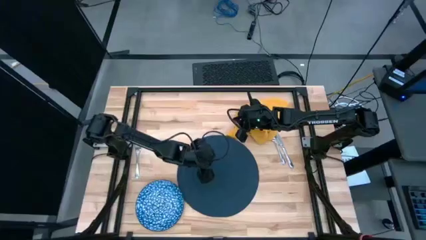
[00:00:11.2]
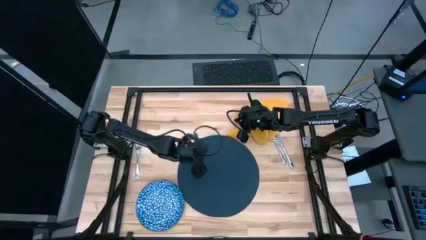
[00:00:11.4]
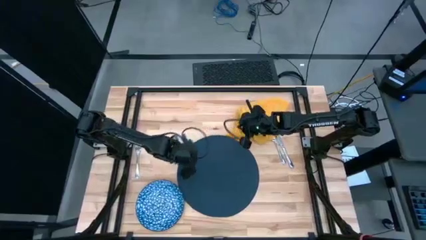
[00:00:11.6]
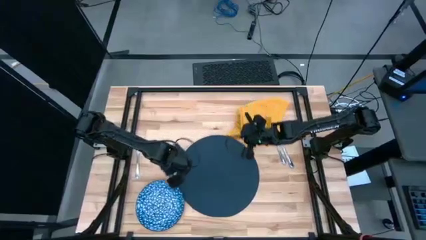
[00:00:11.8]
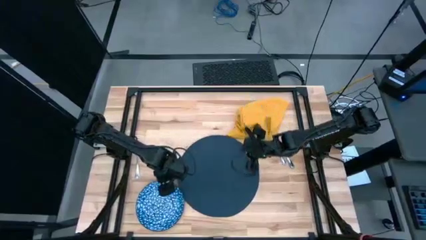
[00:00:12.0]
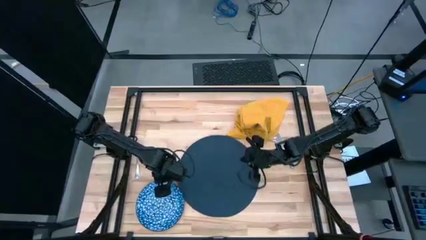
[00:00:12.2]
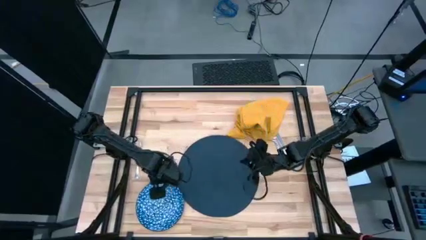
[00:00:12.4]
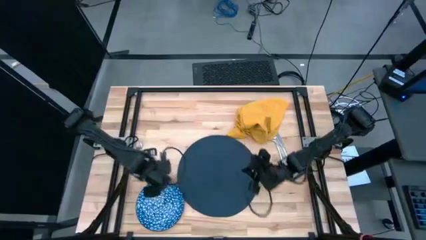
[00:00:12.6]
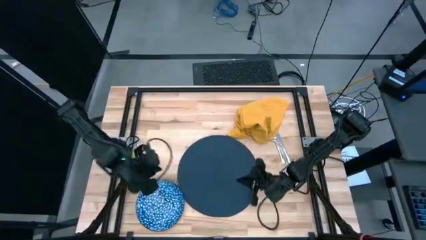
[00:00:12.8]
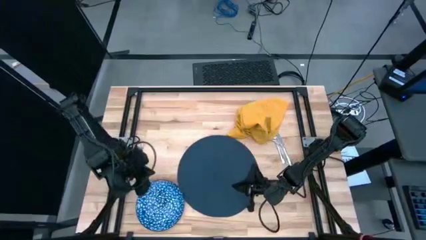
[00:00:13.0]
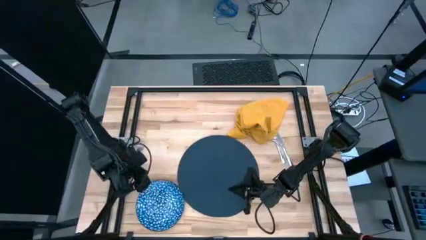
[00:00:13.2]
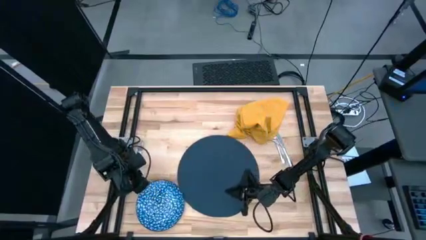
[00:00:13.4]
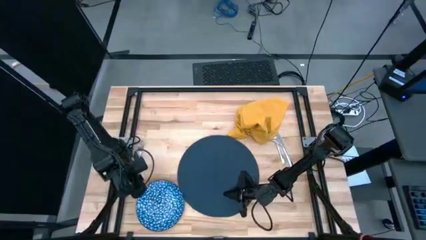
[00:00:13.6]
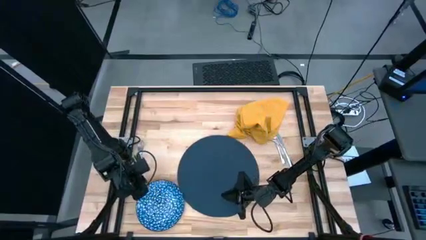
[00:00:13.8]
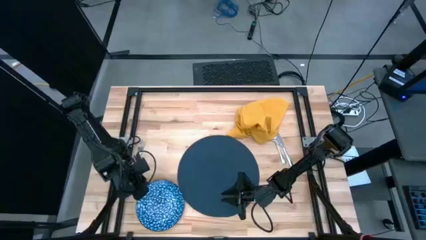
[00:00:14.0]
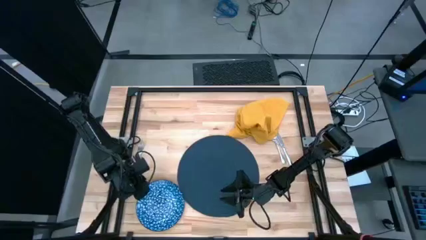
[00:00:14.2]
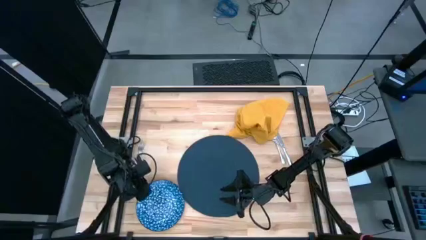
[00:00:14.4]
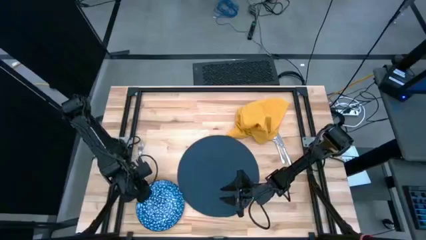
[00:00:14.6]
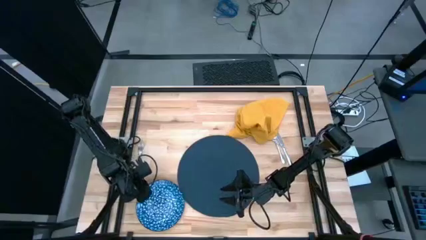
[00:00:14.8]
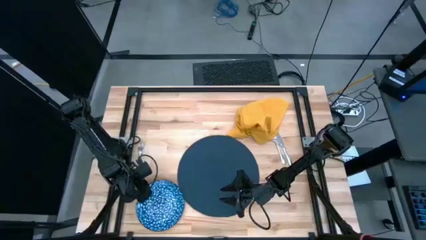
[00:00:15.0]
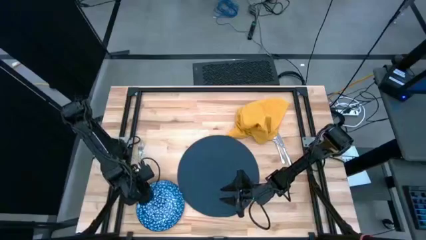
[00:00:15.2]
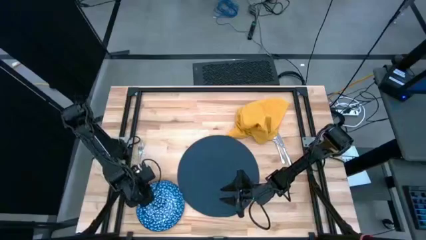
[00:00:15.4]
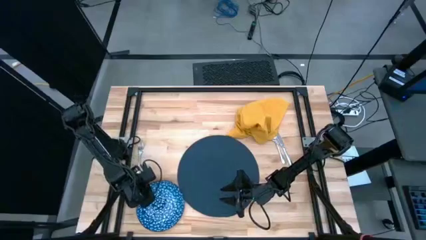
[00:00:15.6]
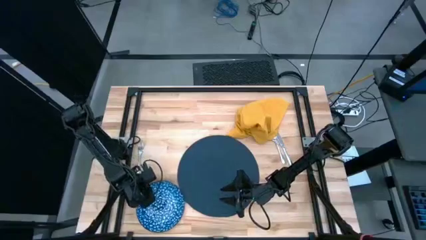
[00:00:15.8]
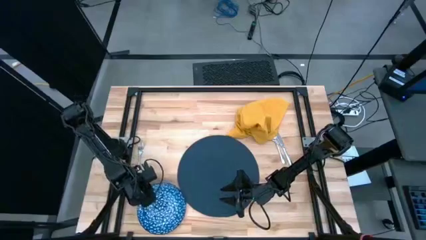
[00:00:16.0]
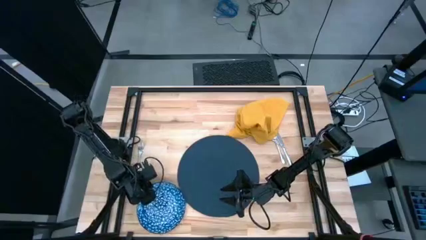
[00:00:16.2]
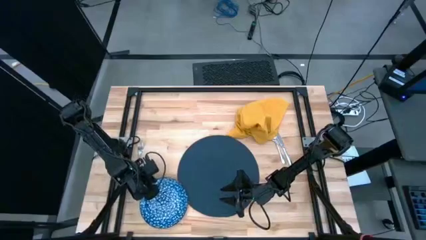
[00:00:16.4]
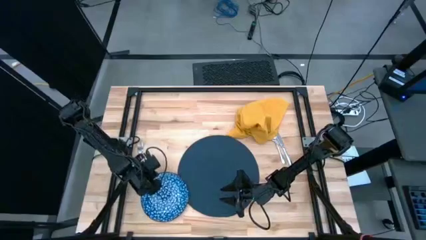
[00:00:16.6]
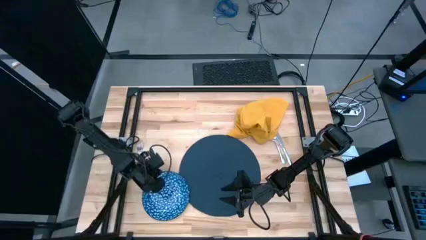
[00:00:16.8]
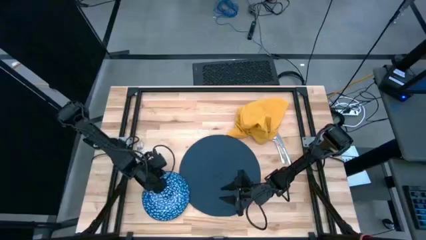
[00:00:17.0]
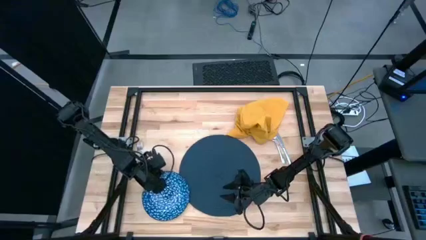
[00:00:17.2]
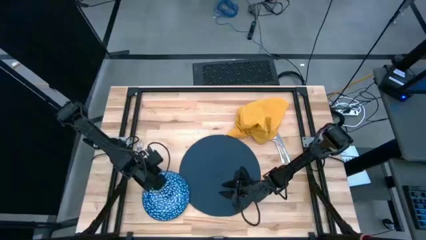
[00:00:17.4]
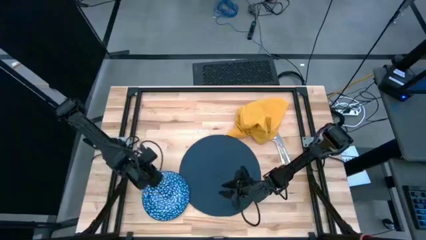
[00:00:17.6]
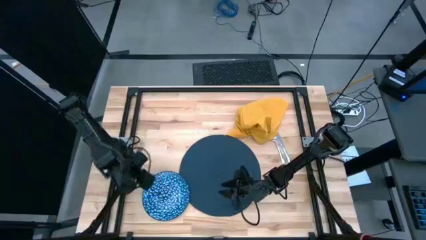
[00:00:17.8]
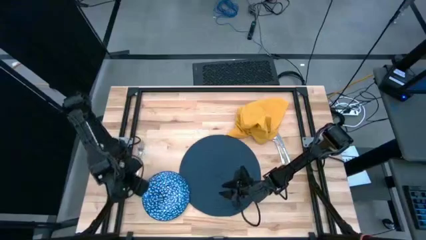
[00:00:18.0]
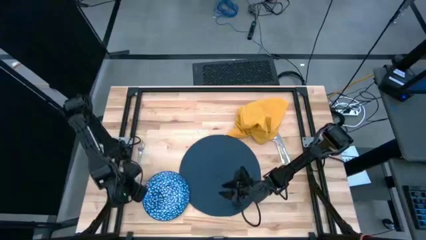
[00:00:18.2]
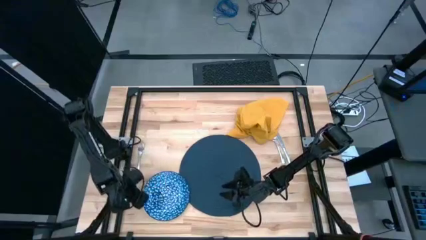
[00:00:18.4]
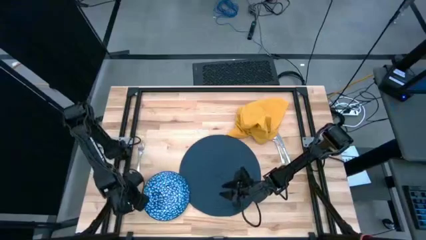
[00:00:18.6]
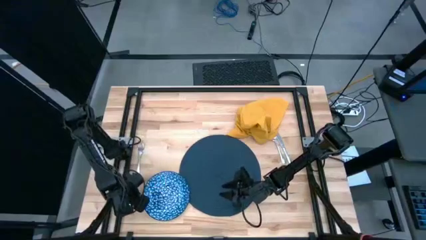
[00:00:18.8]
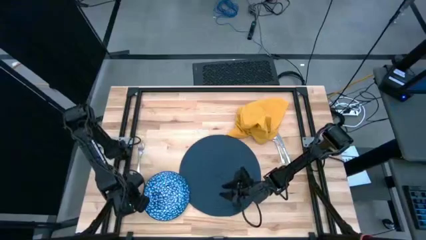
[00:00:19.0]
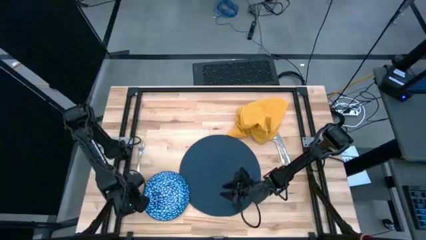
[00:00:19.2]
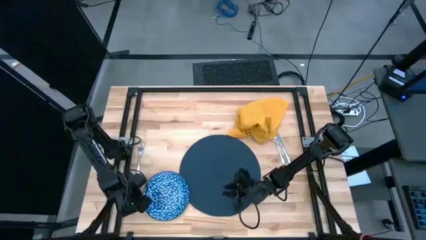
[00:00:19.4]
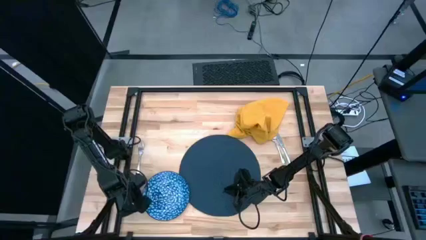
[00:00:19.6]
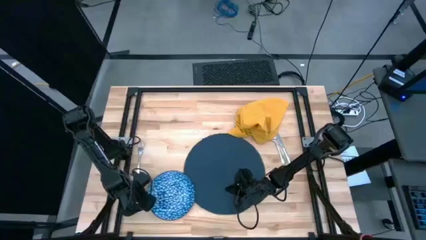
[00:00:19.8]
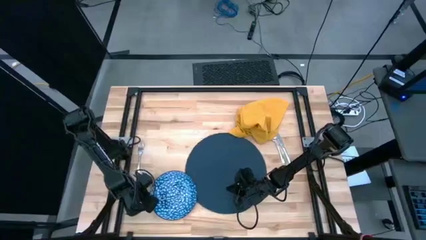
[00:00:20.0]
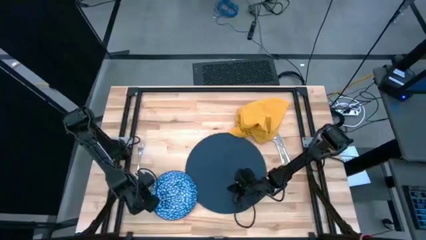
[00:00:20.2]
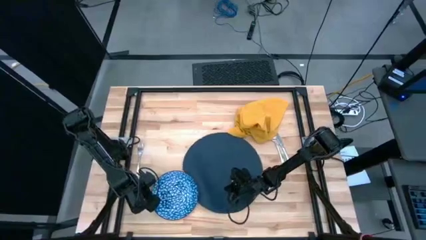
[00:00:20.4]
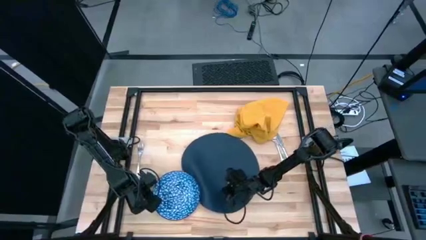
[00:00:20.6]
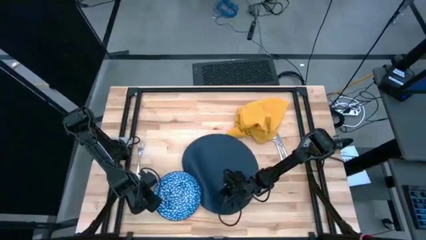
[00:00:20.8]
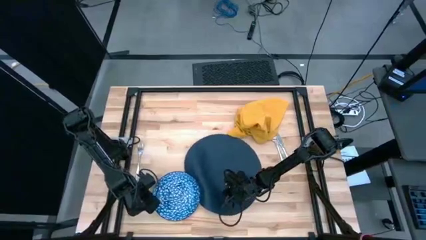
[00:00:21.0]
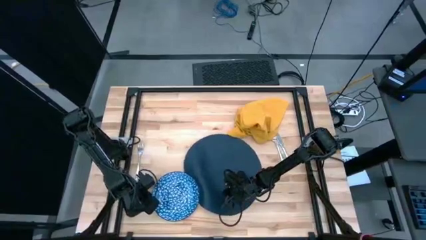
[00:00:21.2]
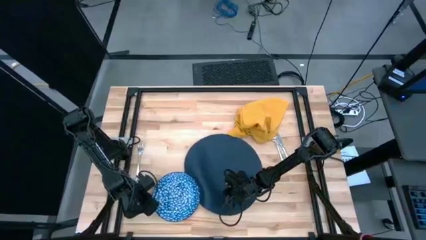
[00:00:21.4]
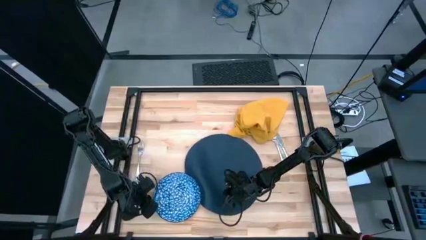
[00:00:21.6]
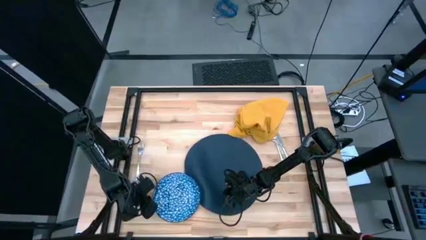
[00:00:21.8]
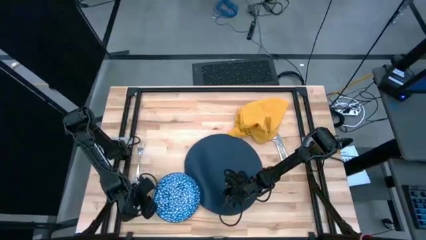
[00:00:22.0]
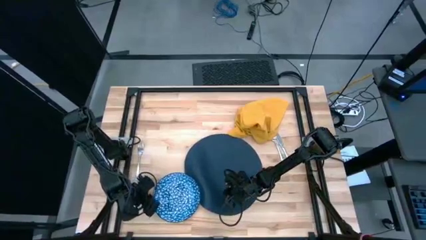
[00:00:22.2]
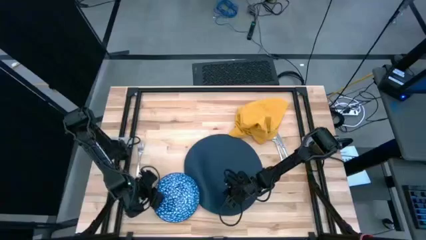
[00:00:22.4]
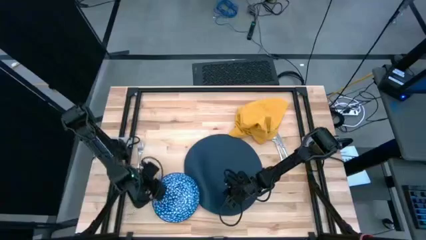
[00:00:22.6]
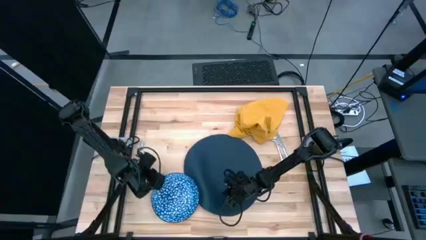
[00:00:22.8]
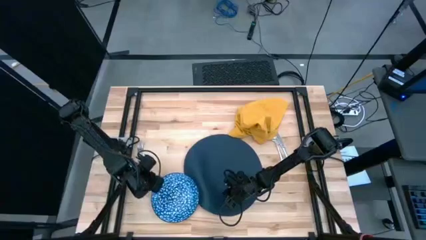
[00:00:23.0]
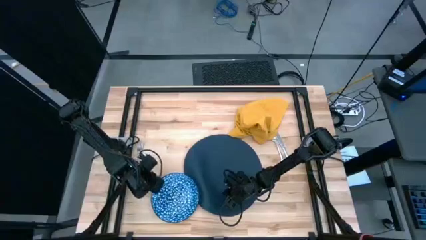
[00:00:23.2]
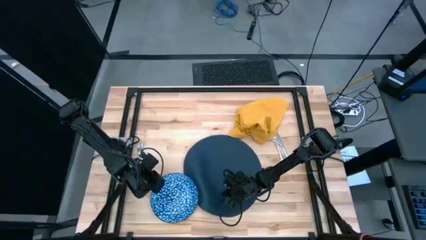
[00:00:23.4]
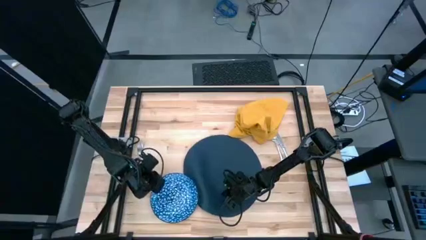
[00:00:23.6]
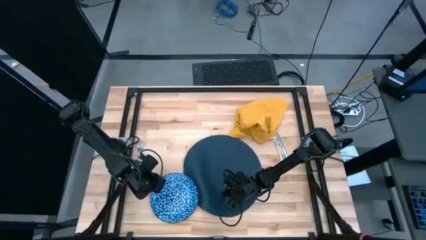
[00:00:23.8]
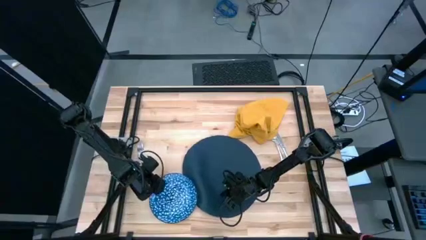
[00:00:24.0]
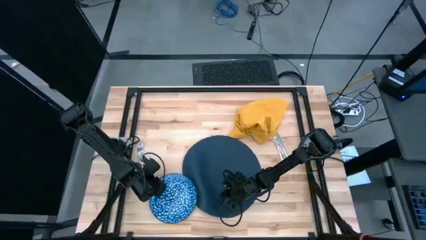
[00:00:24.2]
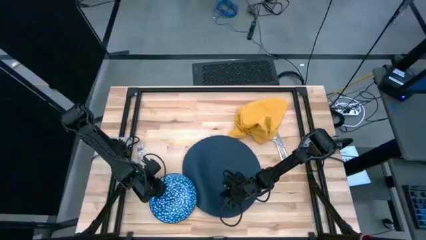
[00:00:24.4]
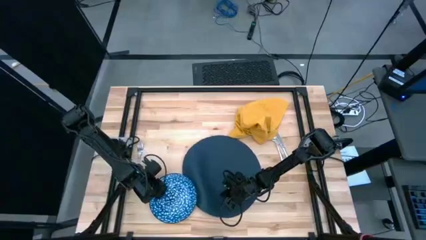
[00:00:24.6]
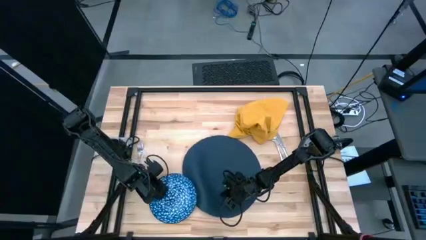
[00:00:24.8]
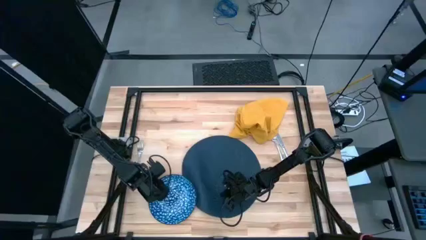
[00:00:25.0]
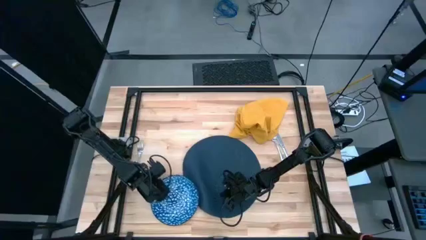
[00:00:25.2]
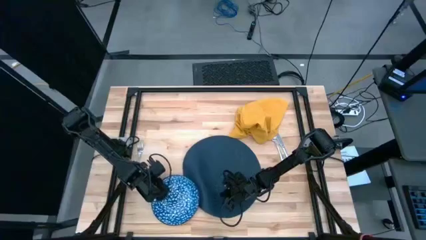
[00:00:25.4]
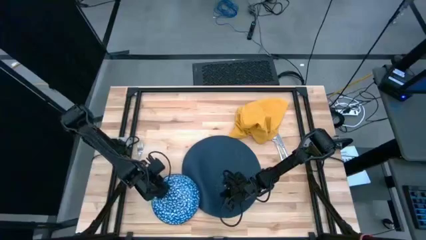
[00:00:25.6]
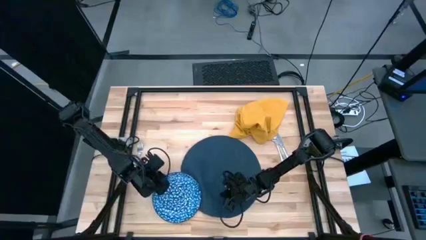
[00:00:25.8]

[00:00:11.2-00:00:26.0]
Task: Set table place
Put the blue plate on the blue tablemat
